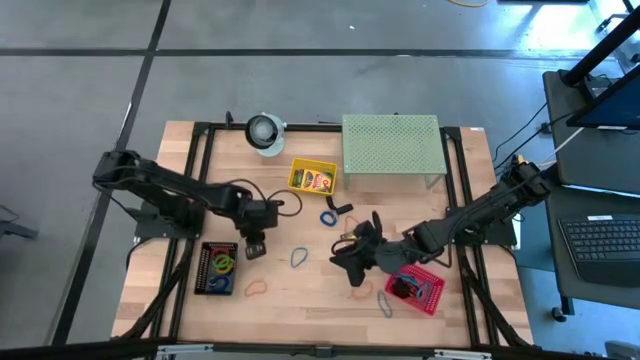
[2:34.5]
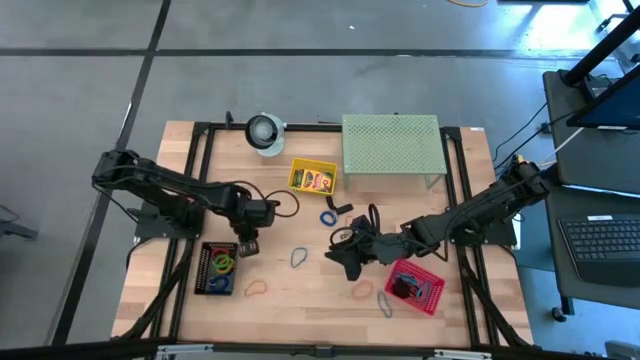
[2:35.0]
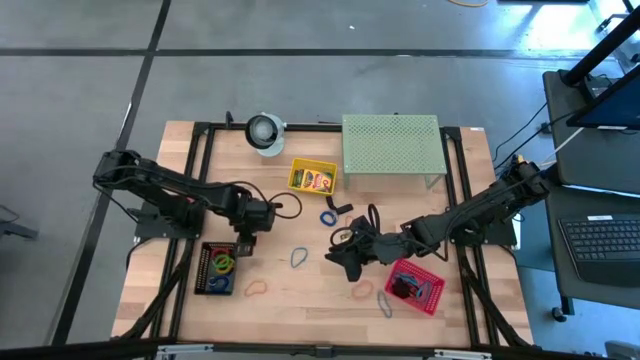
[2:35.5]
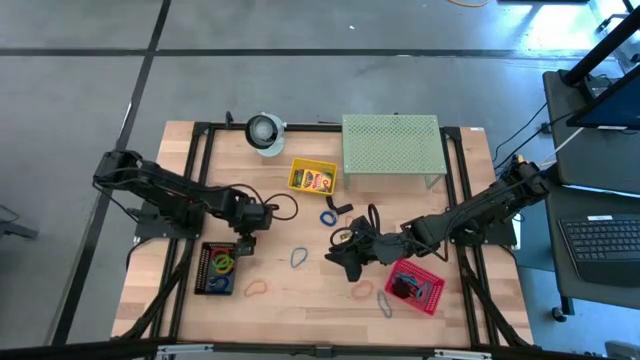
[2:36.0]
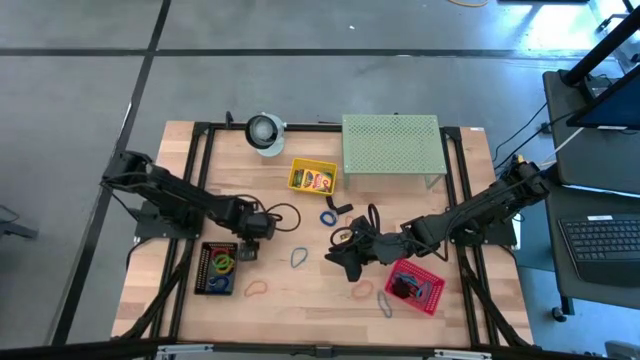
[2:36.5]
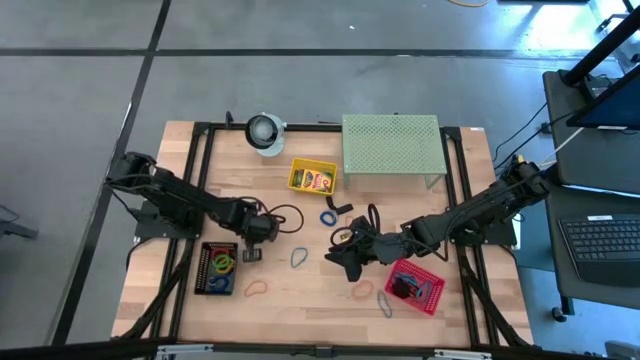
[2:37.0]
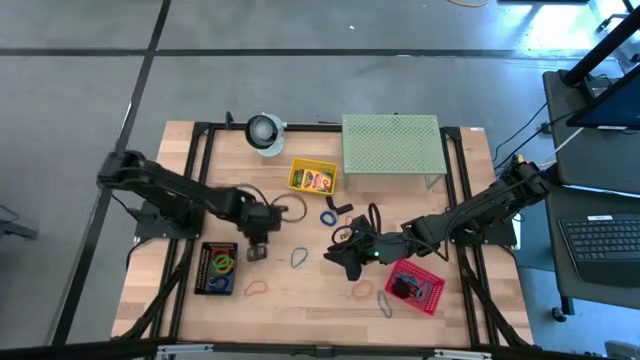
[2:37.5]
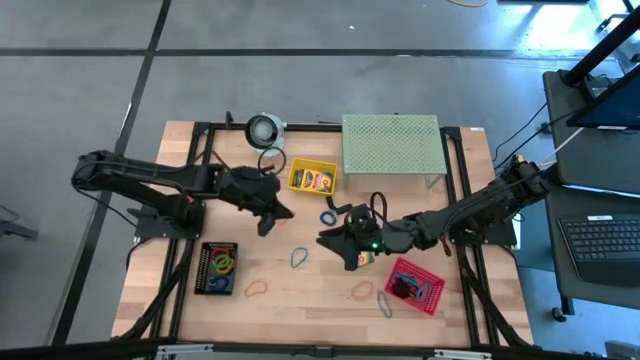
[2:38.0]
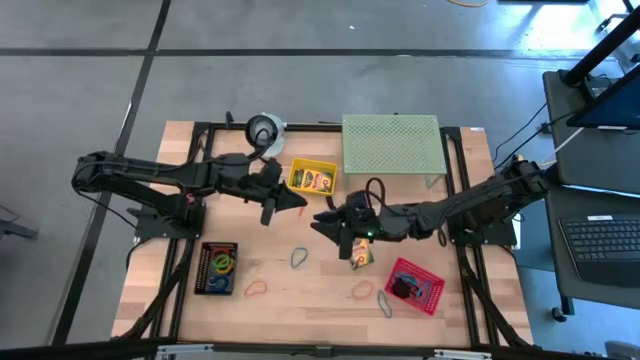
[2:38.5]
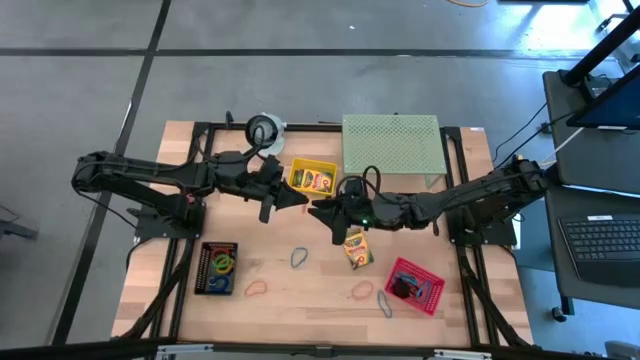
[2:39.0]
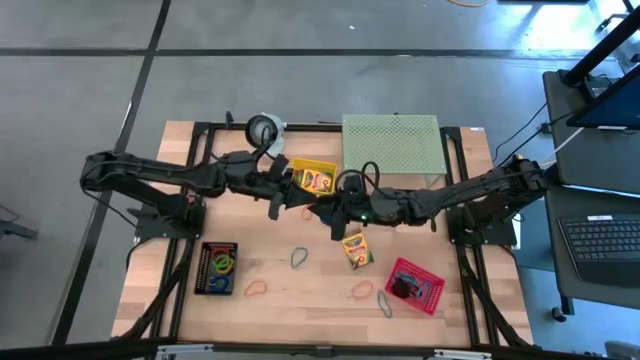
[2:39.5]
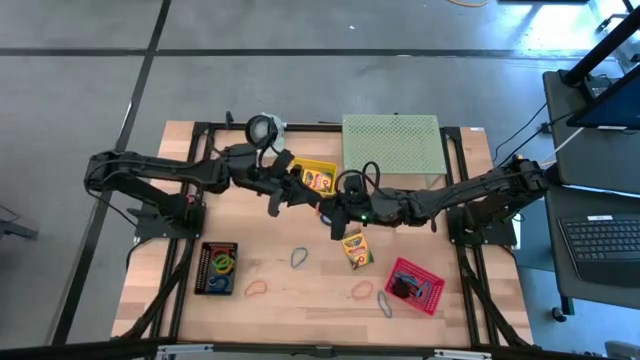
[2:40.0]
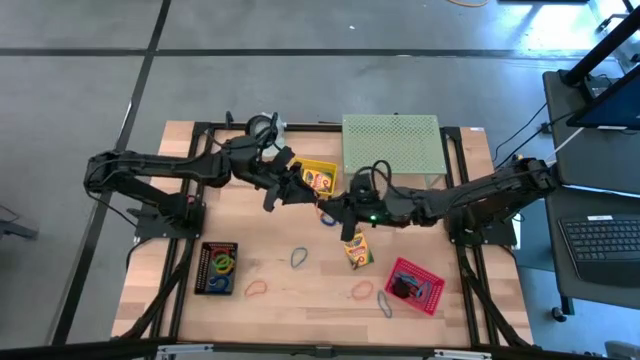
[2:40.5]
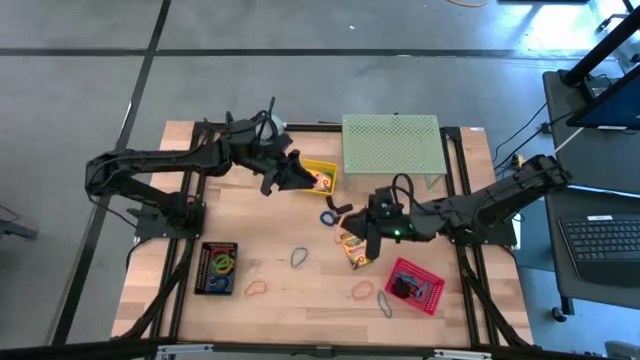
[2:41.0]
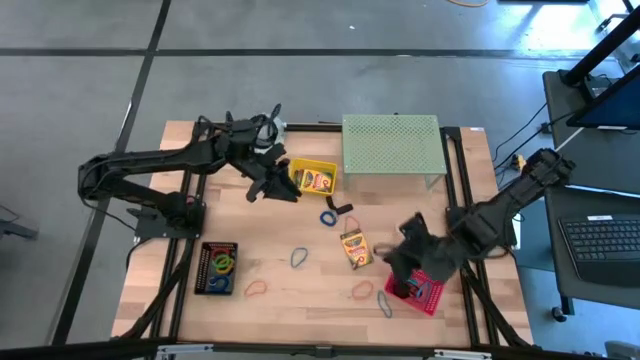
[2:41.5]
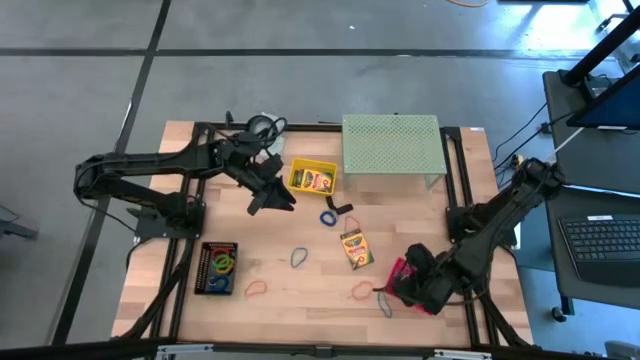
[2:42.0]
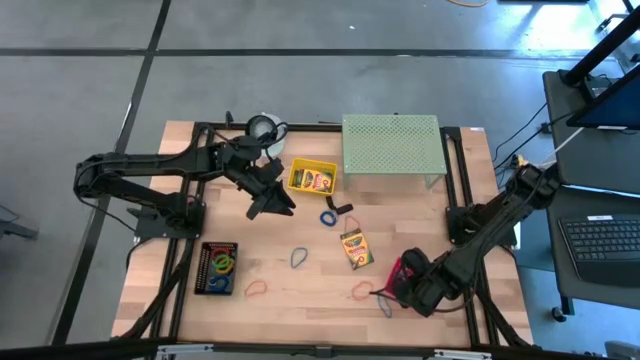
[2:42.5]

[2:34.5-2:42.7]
Task: Pick & Place Office Desk Supplies
Put the orange rubber band into the red bin

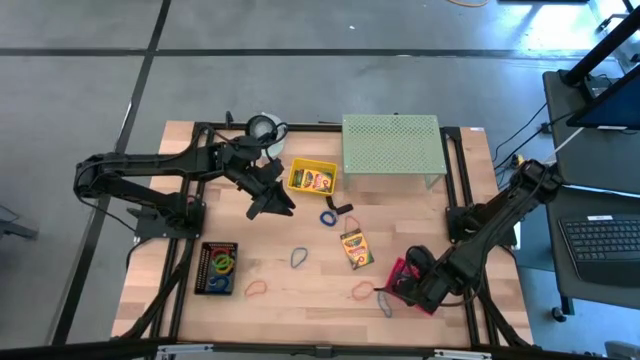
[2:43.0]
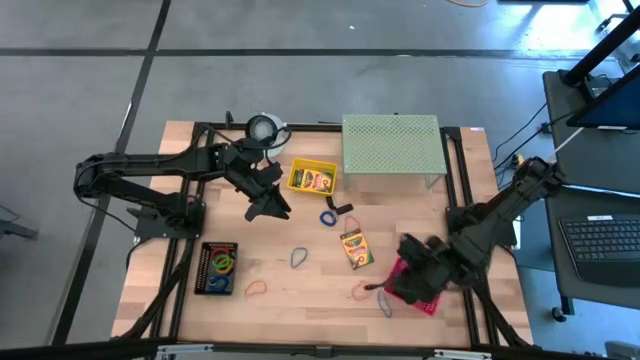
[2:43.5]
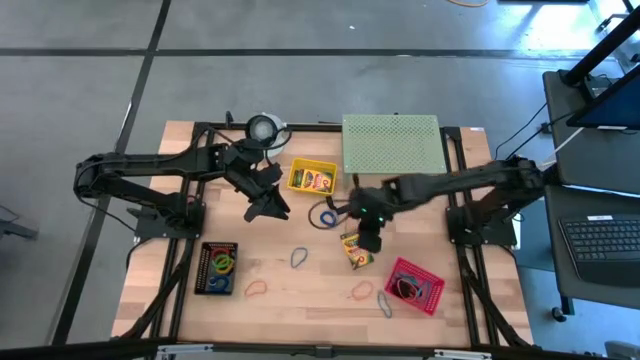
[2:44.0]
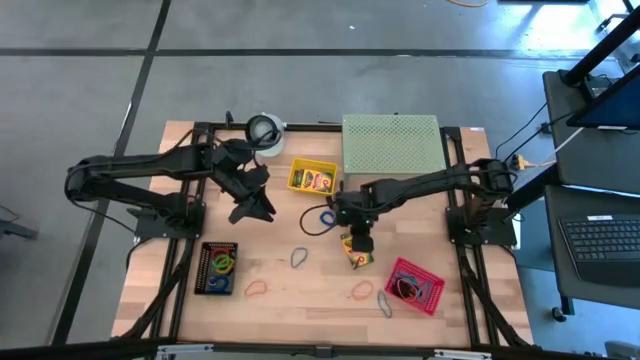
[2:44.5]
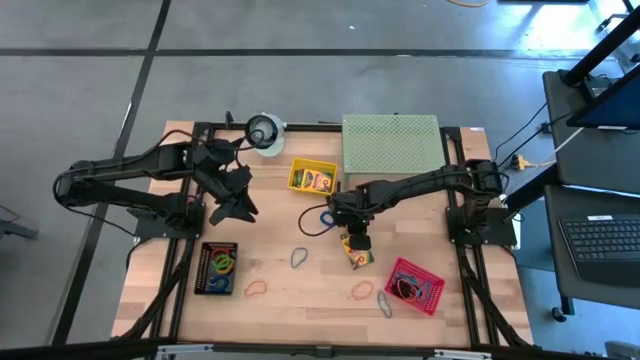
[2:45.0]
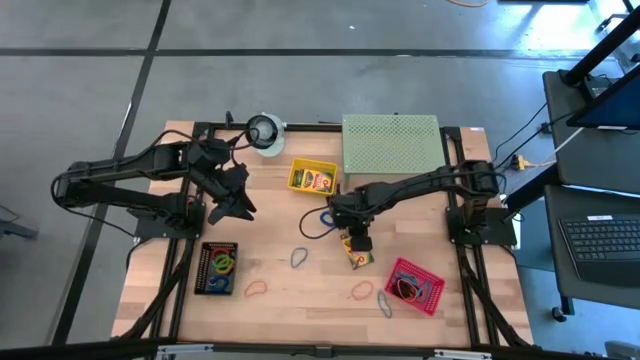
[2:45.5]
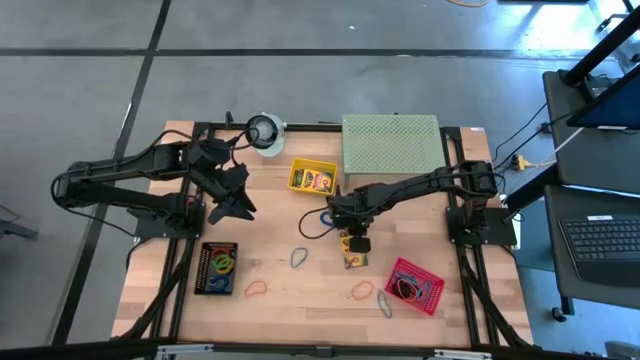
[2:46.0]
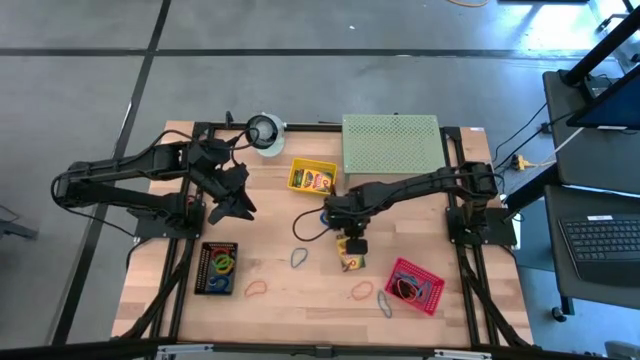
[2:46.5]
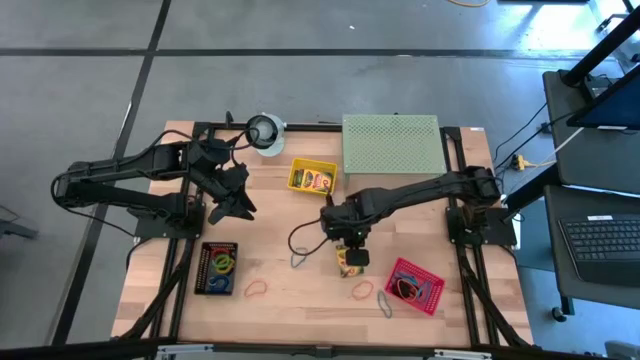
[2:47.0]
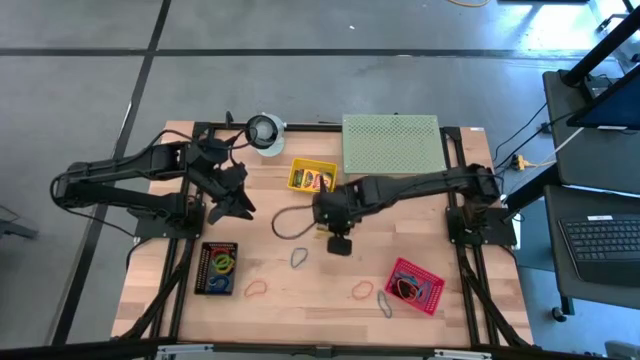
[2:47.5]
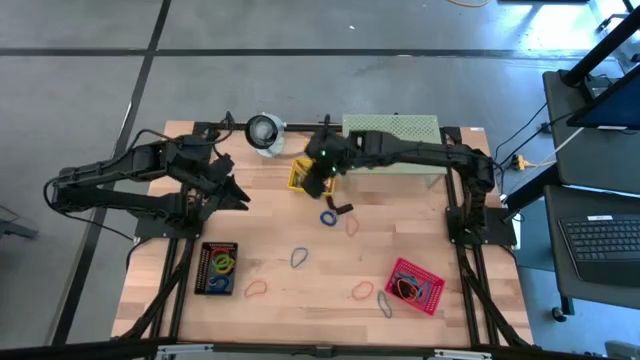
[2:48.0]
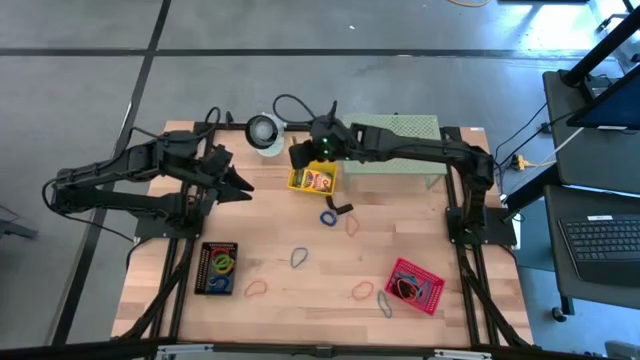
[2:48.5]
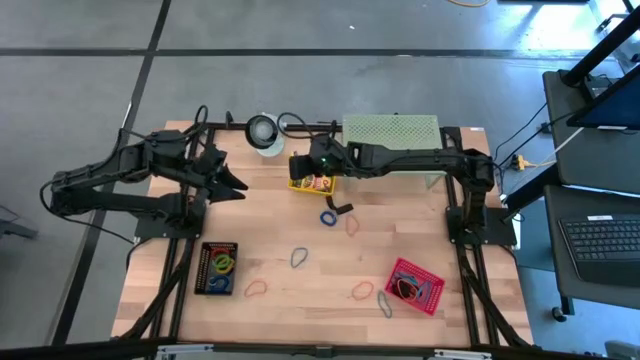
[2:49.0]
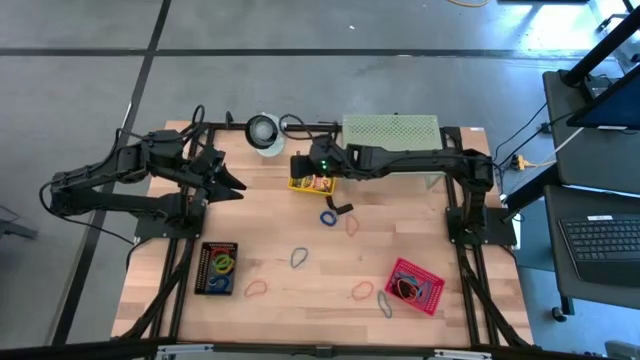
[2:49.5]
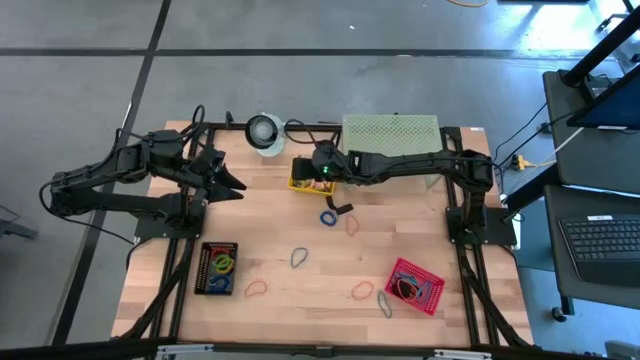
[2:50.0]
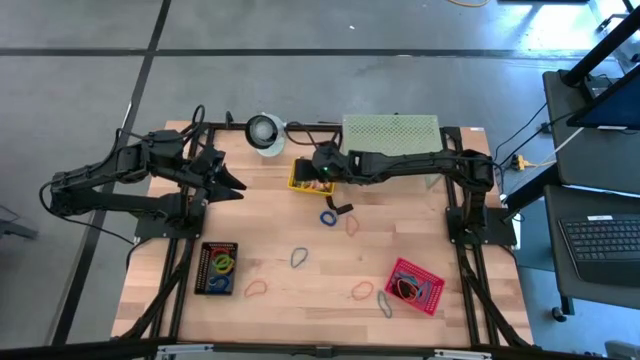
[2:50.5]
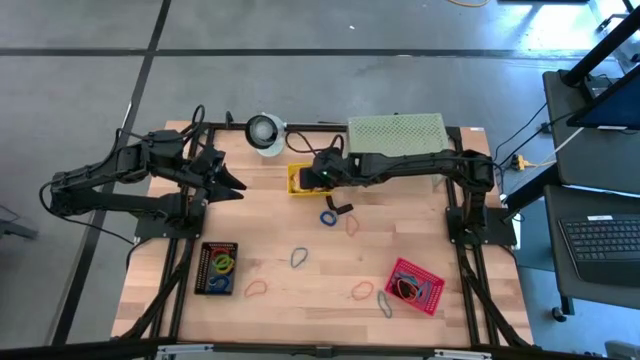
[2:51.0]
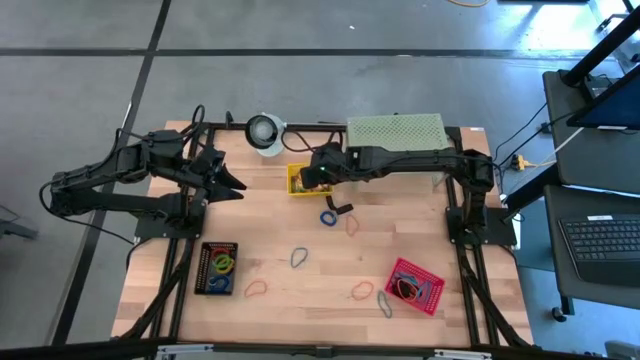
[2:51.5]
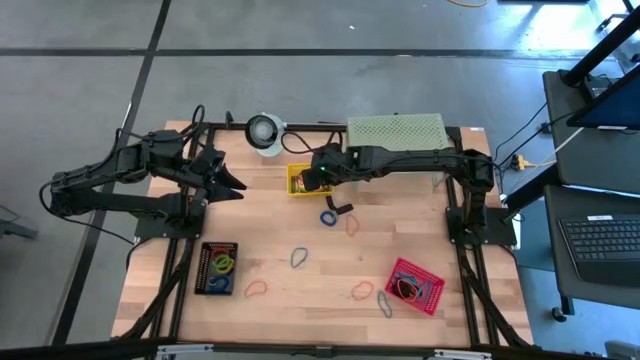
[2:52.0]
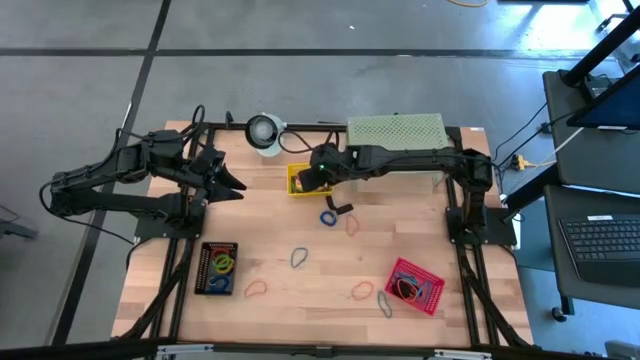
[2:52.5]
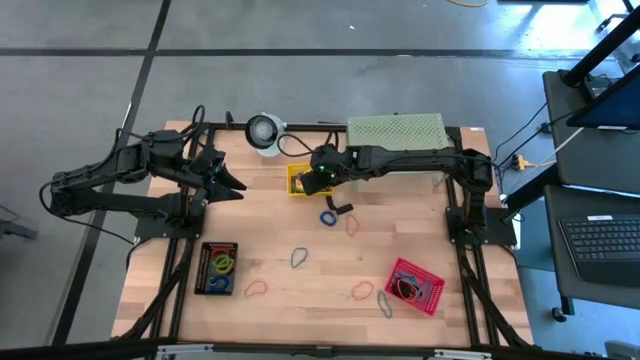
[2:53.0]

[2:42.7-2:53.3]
Put the crayon box into the yellow bin

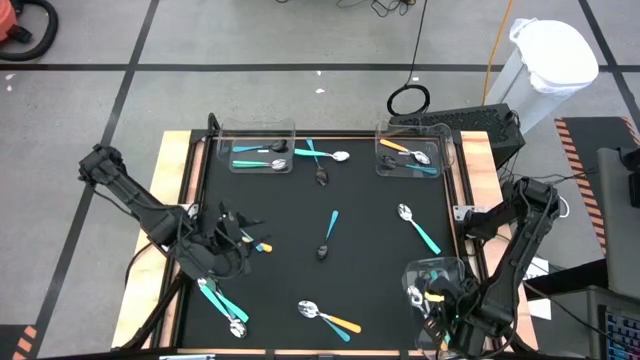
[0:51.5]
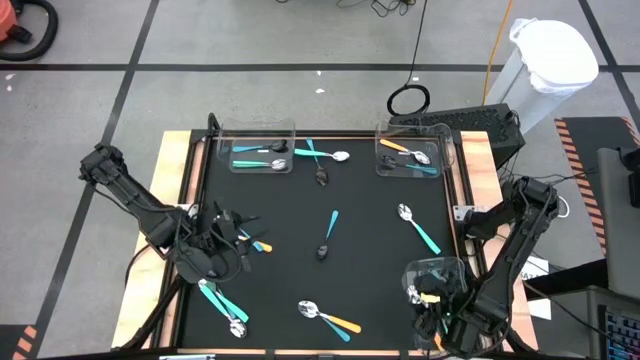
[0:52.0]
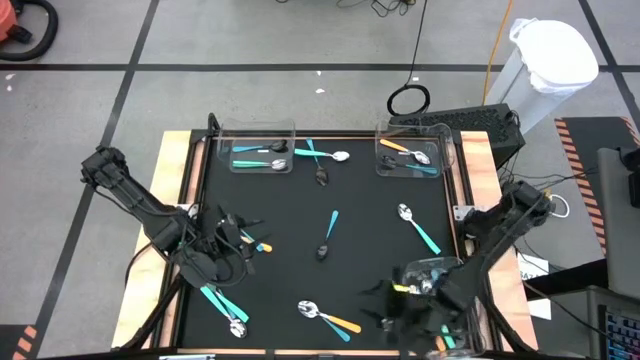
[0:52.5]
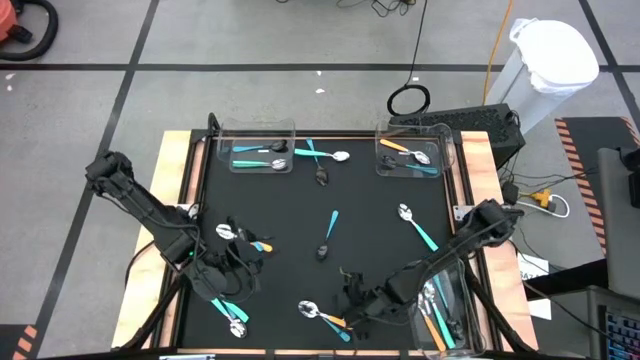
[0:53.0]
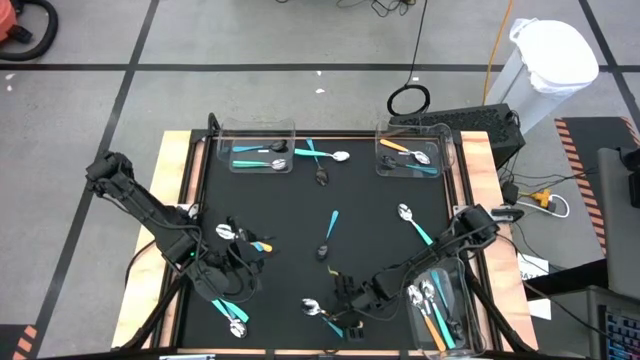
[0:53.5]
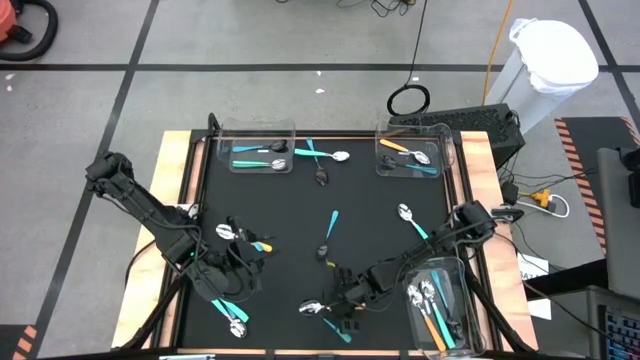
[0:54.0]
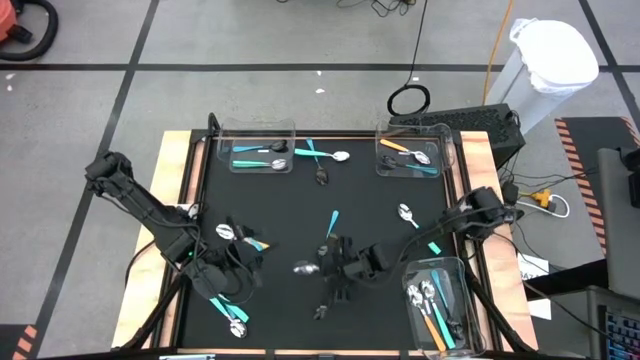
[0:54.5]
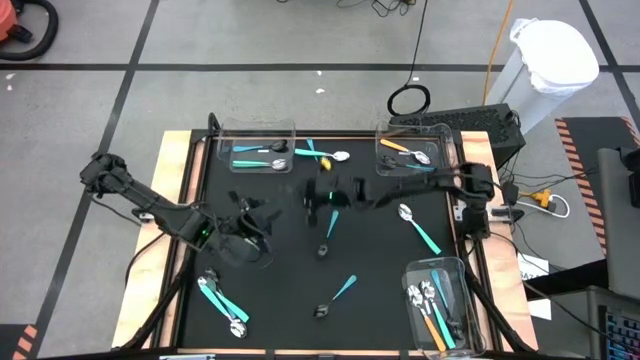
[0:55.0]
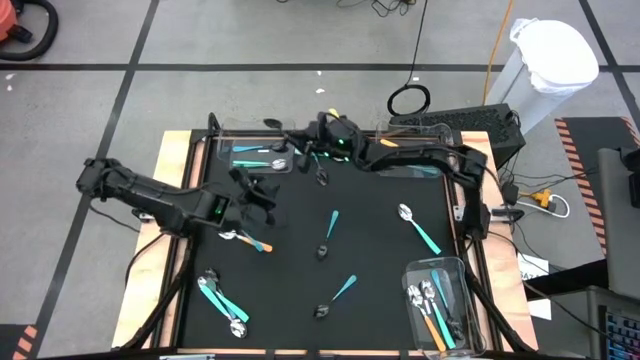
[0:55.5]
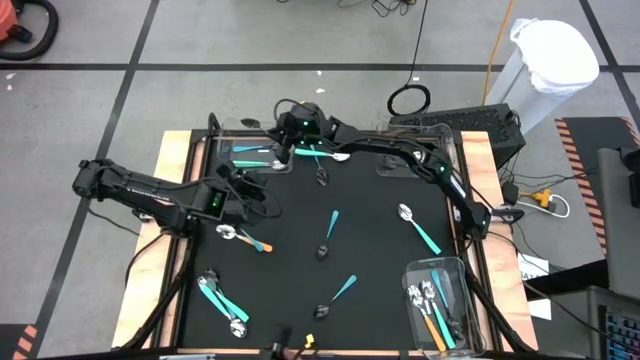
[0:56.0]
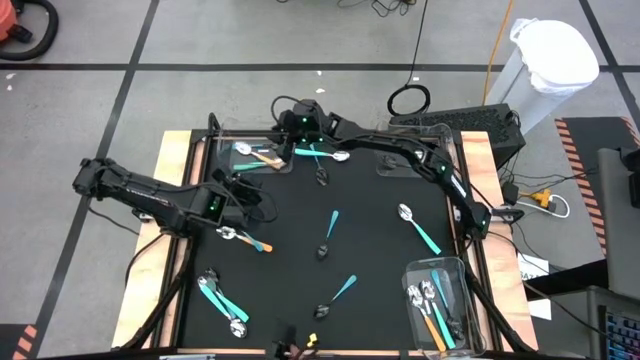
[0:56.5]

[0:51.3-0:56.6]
Task: Sort silverware by color (type)
Put the yellow spoon into the top left transparent bin
